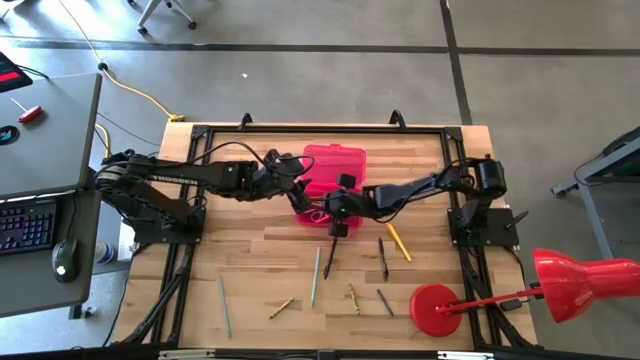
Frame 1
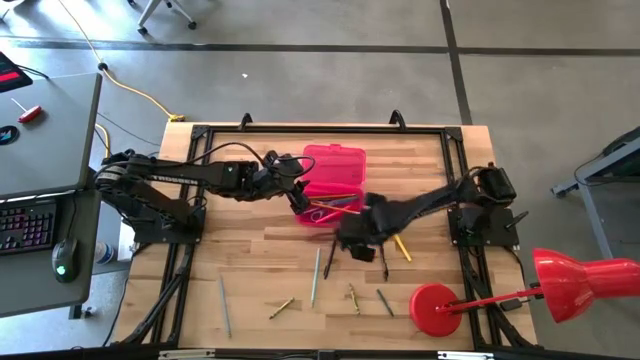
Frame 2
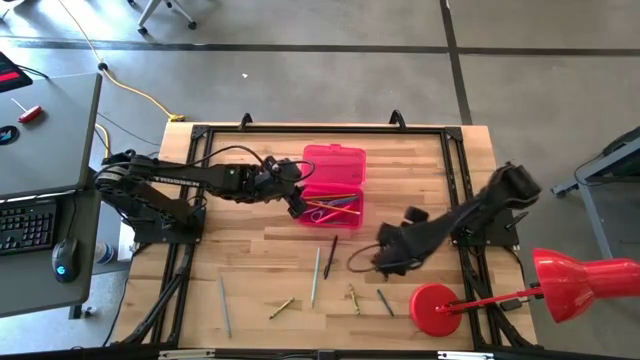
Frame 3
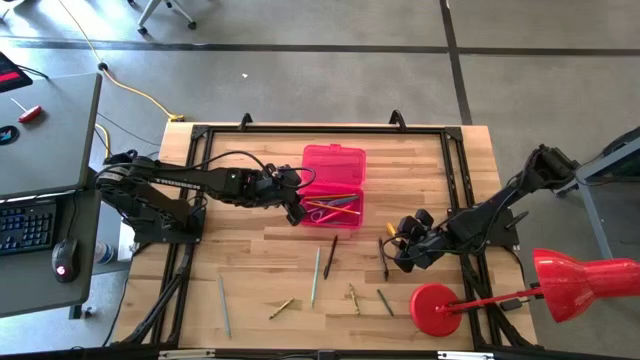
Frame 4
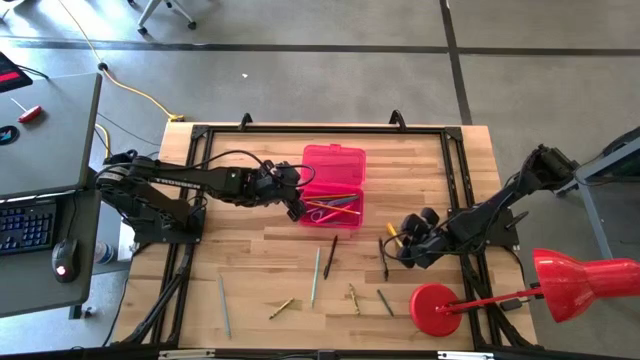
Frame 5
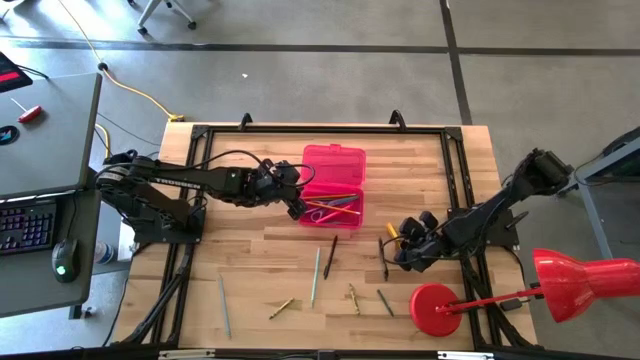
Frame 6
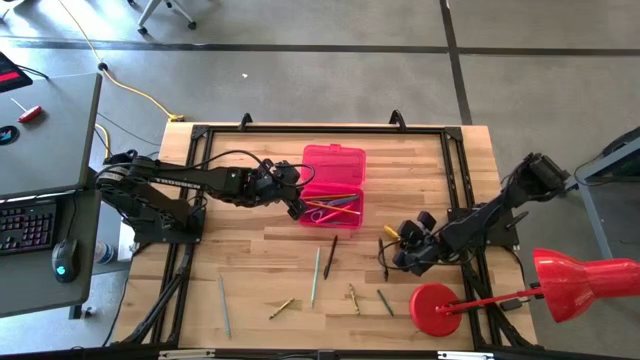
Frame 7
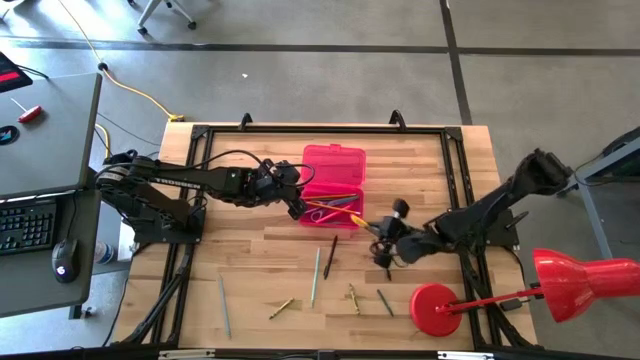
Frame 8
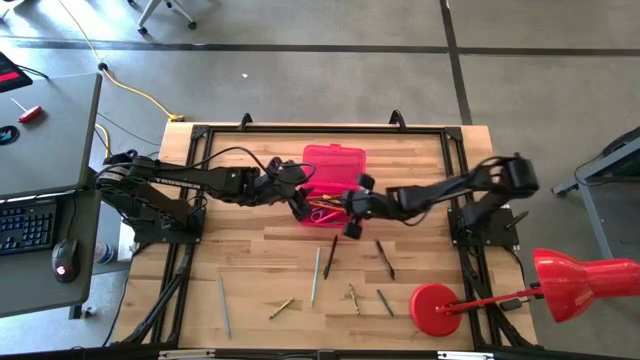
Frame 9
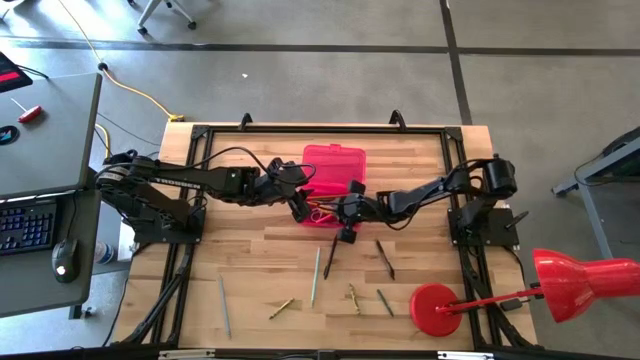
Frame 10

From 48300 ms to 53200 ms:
Task: Pick & place school supplies into a supply box
Put the yellow pen into the pink supply box

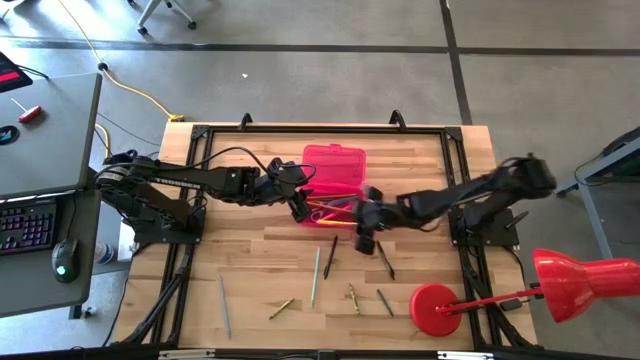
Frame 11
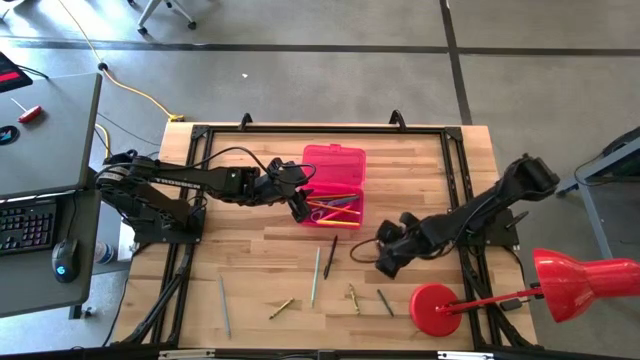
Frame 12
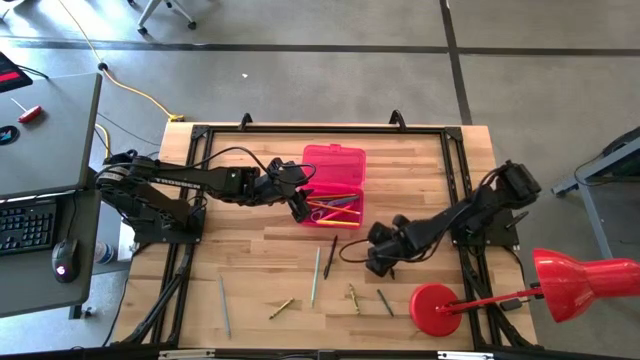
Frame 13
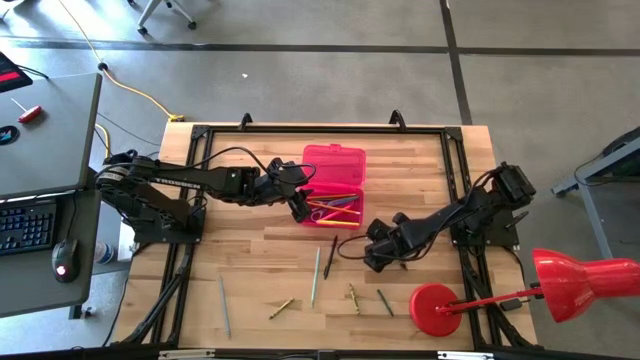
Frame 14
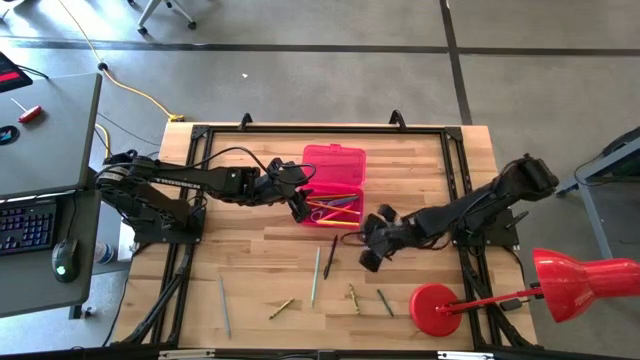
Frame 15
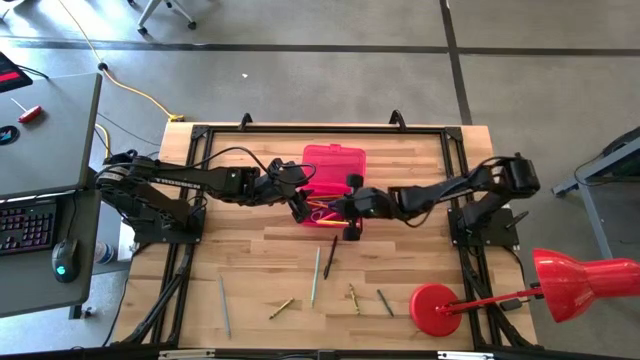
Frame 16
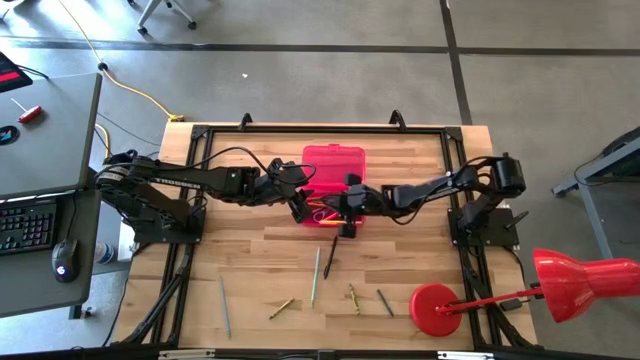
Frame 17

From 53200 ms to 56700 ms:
Put the right black pen into the pink supply box

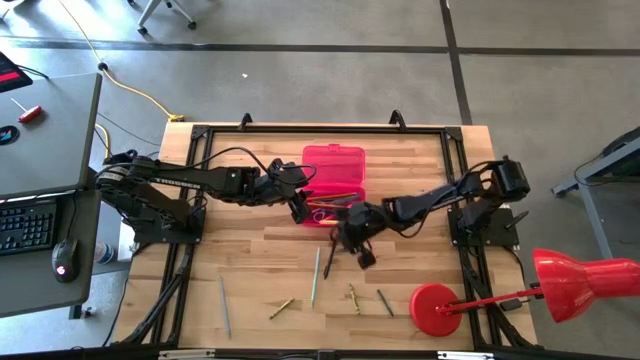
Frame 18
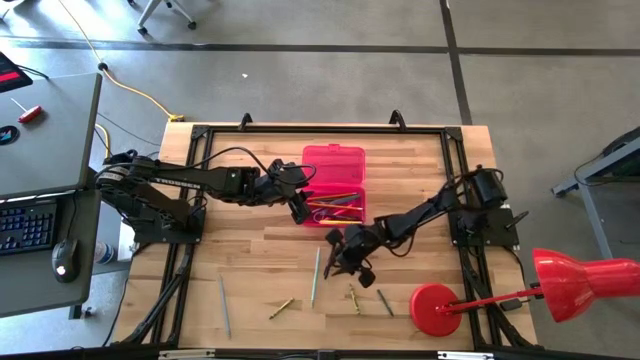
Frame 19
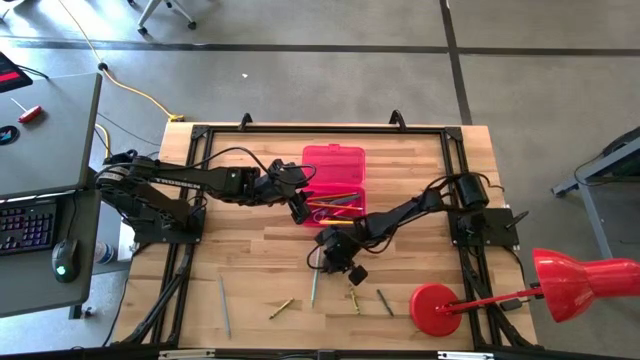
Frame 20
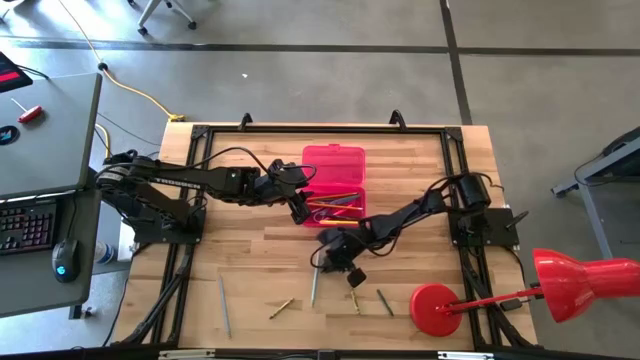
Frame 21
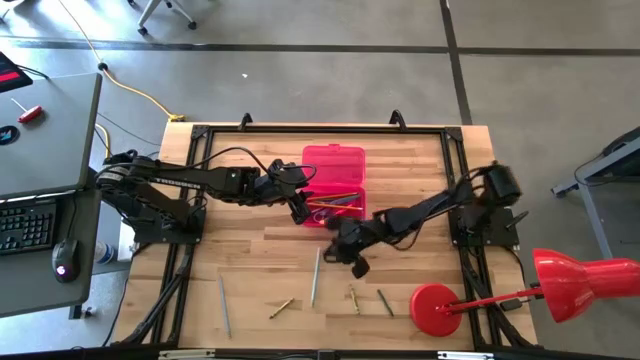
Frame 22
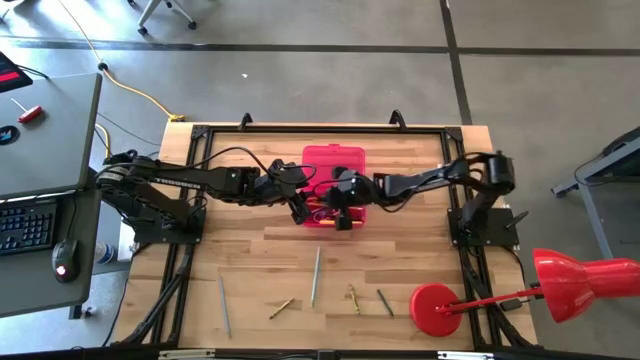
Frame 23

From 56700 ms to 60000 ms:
Put the black pen into the pink supply box

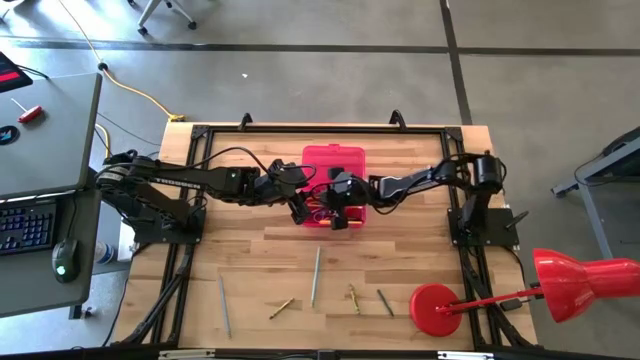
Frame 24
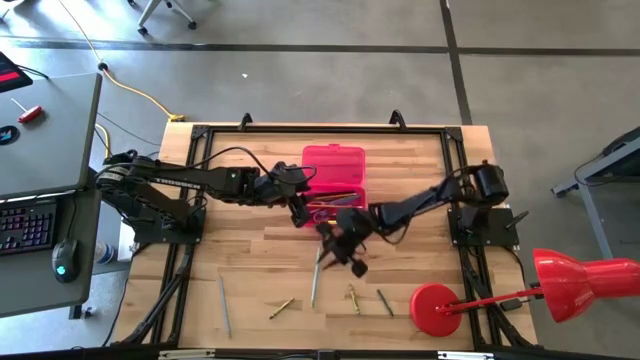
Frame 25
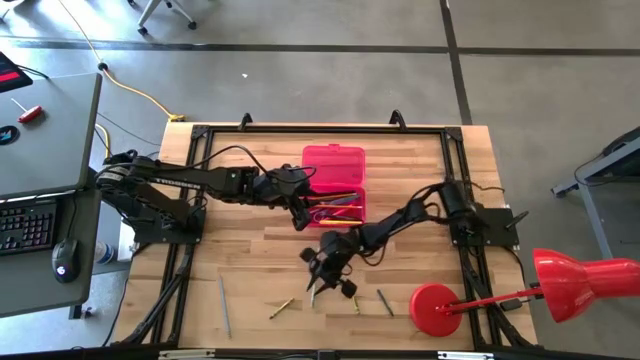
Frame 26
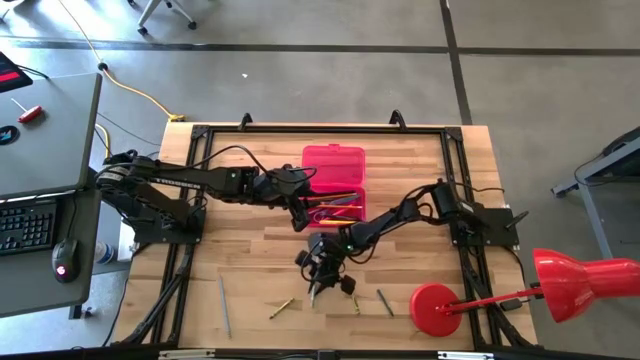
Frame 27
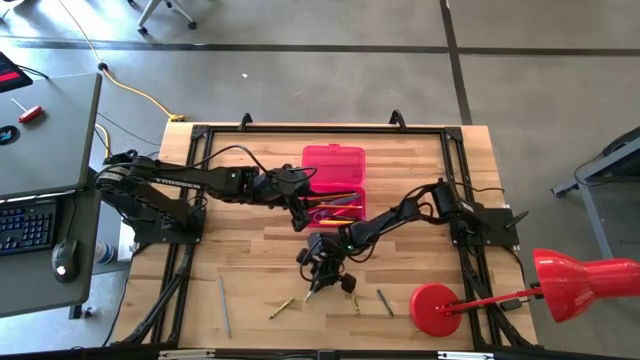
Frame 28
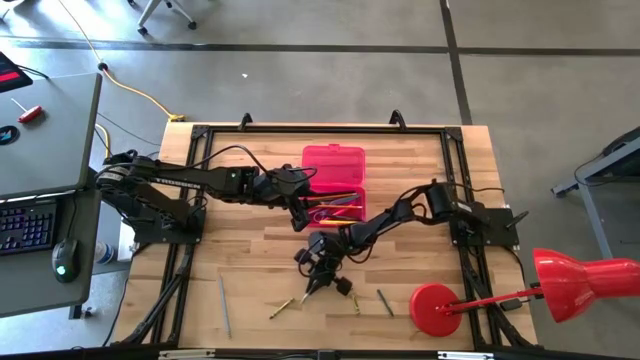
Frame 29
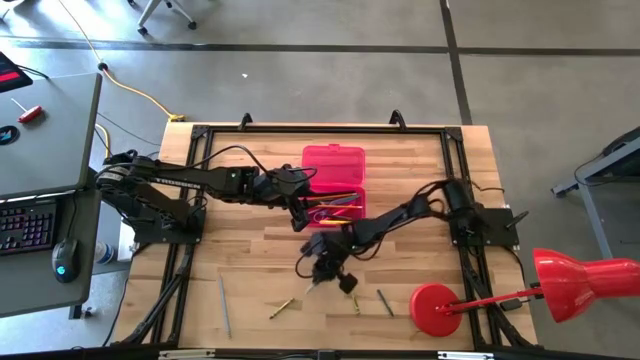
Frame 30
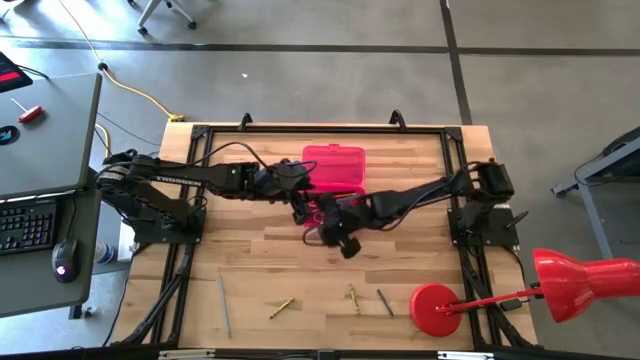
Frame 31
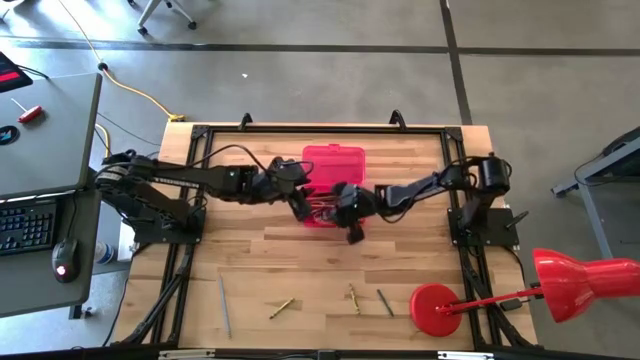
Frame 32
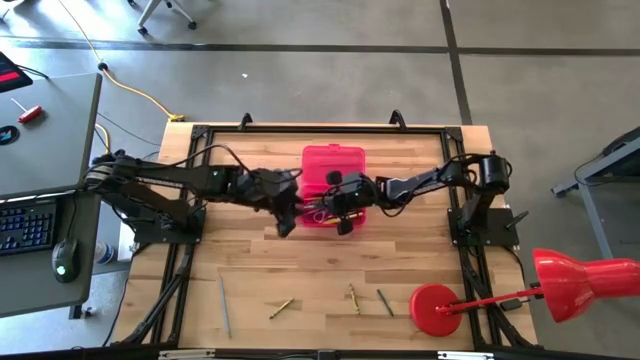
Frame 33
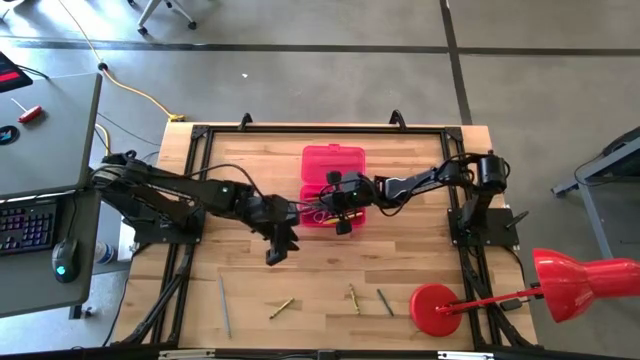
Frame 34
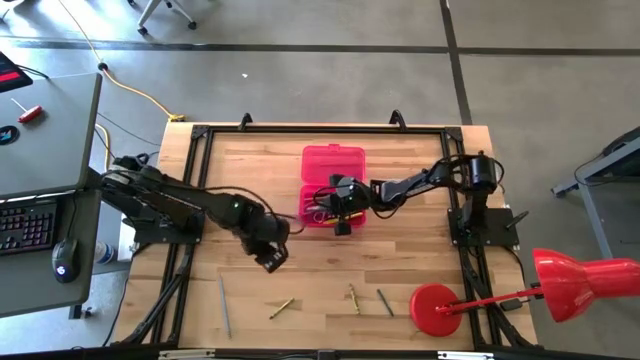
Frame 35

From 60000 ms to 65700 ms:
Put the right blue pencil into the pink supply box

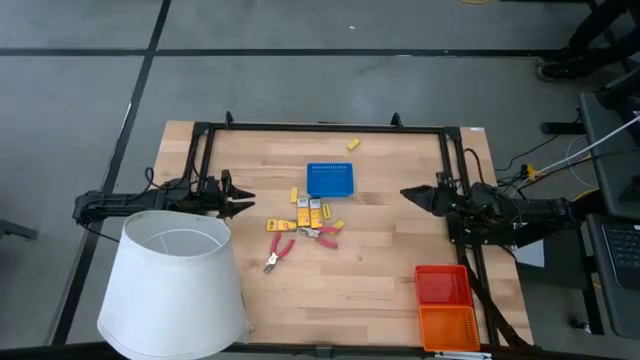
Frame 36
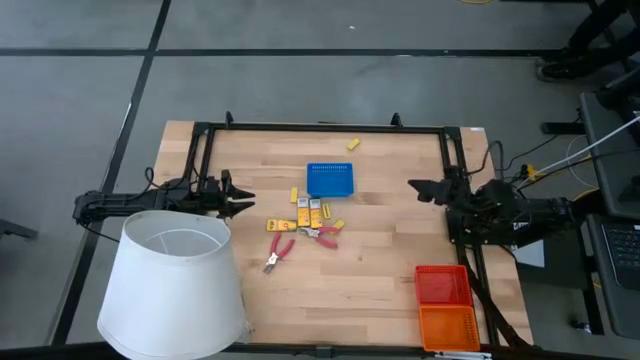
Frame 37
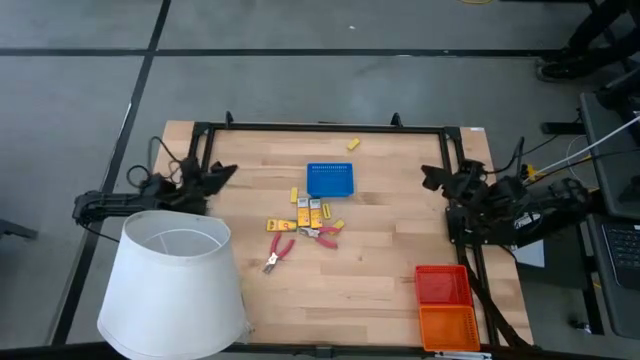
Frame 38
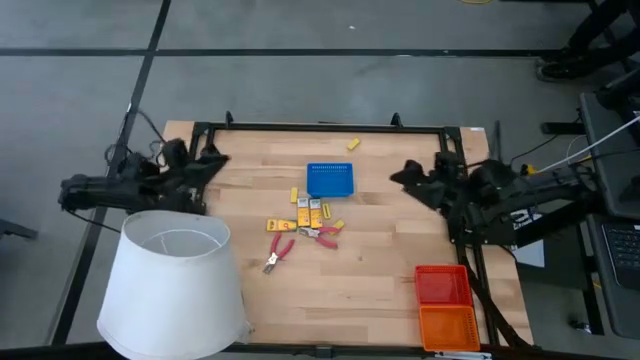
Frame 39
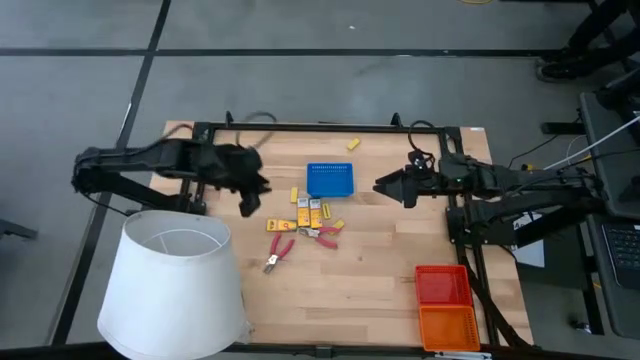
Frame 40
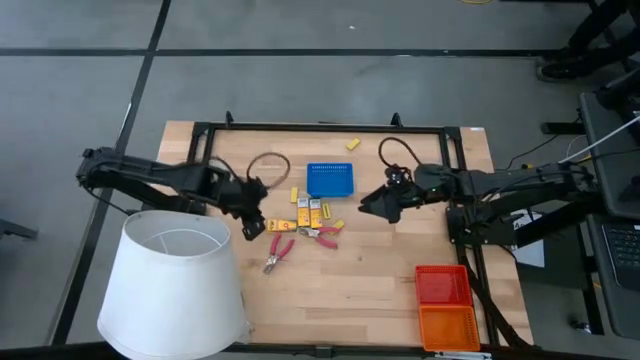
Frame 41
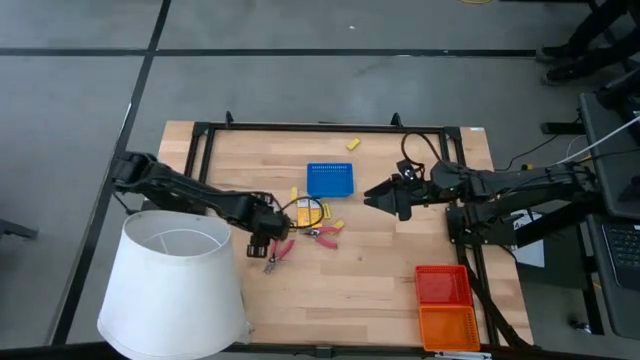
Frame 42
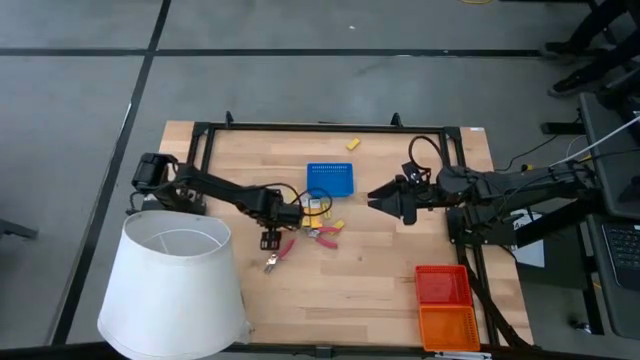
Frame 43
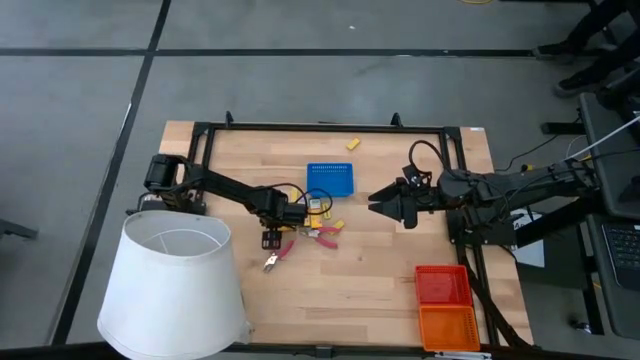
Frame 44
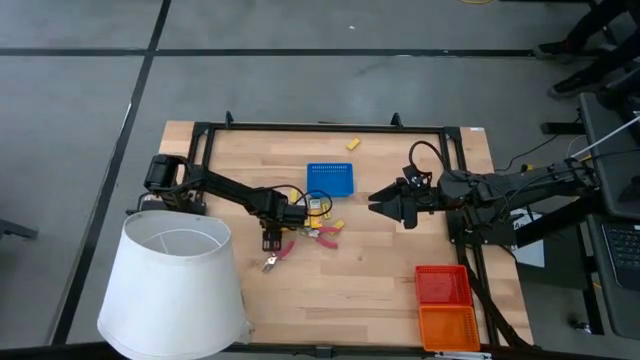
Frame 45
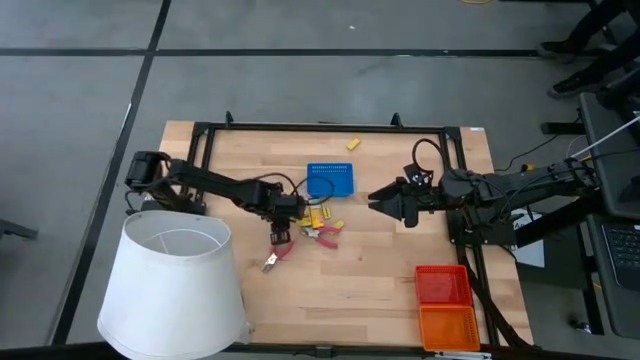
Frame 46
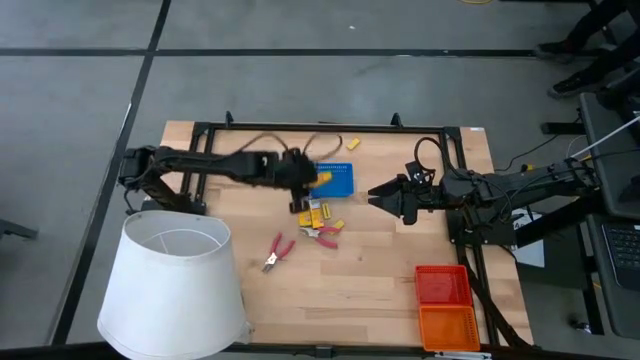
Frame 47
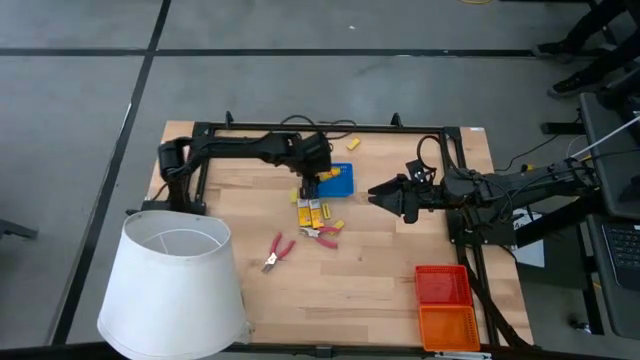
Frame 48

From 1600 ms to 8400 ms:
Task: Pick & Place School Supplies
Put the yellow crayon box into the blue bin
